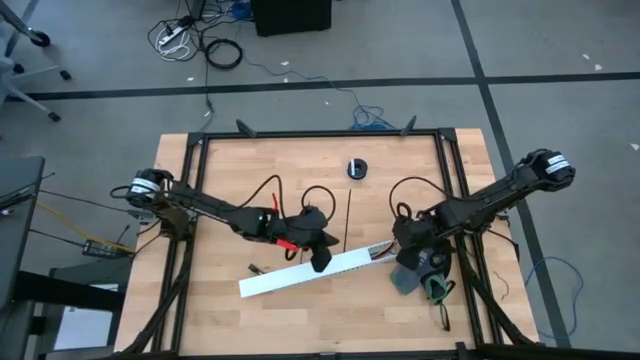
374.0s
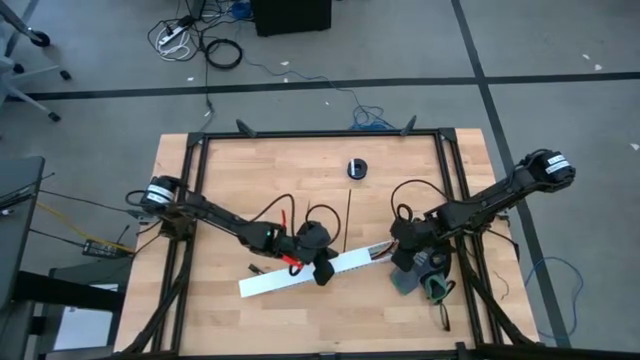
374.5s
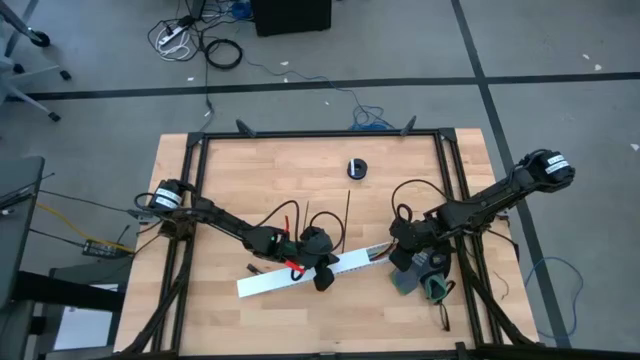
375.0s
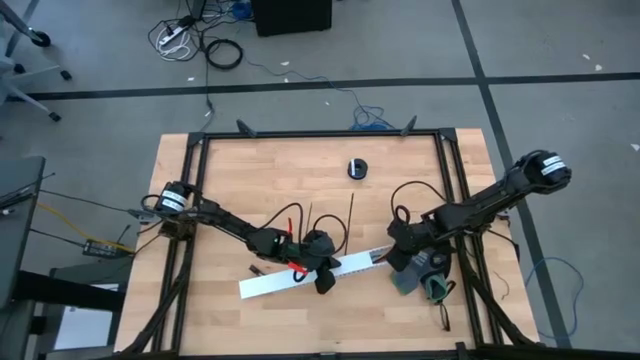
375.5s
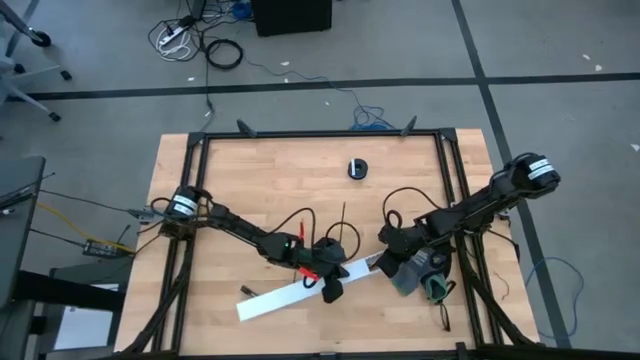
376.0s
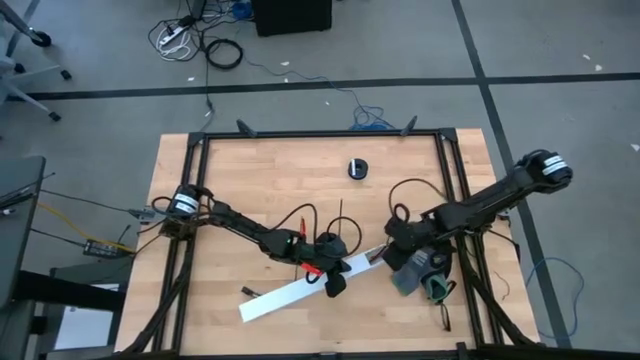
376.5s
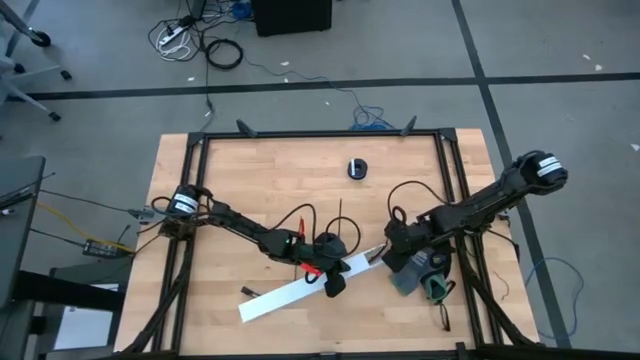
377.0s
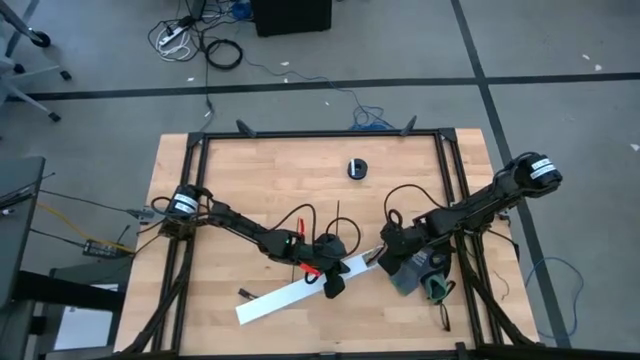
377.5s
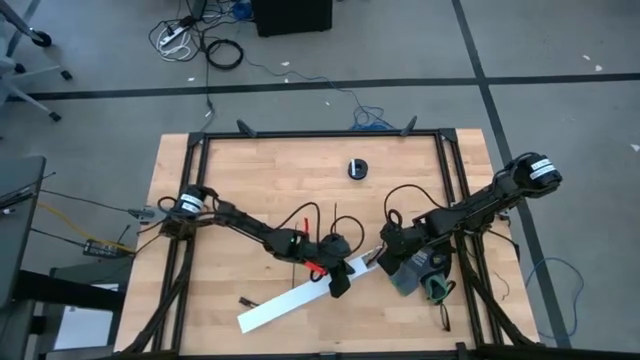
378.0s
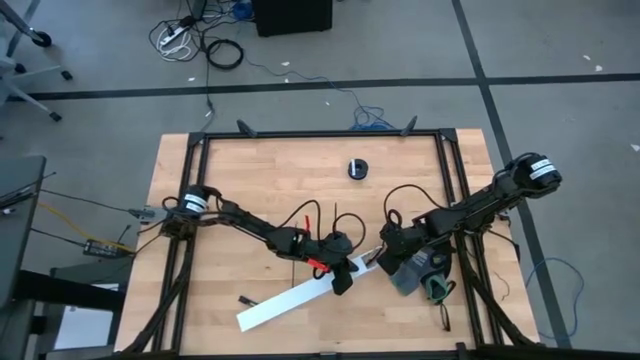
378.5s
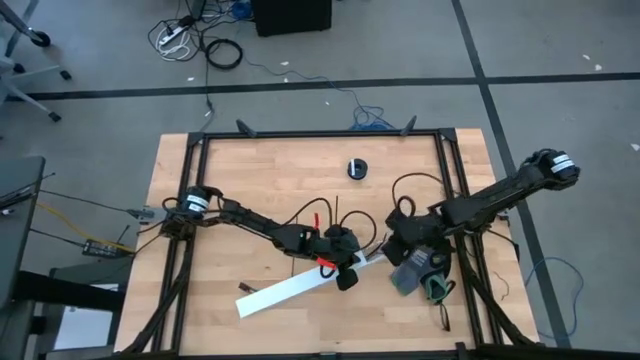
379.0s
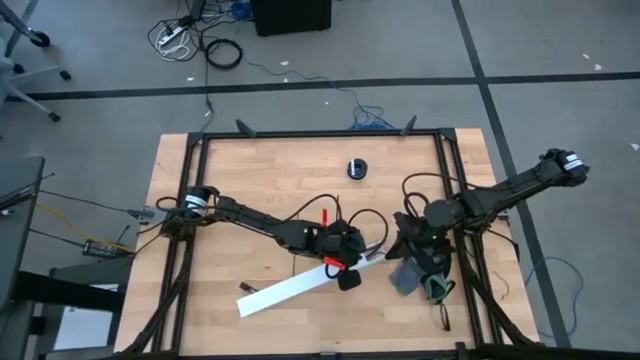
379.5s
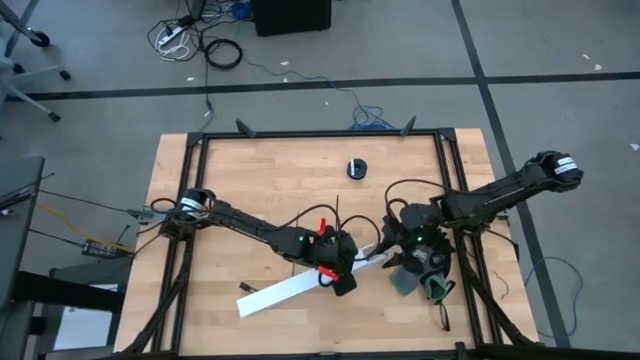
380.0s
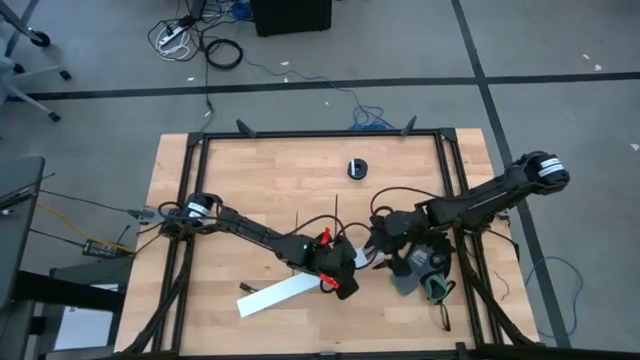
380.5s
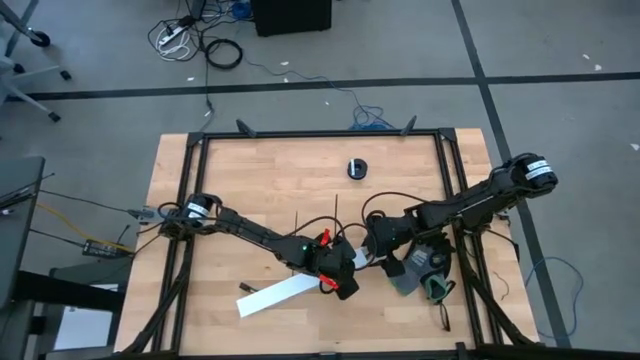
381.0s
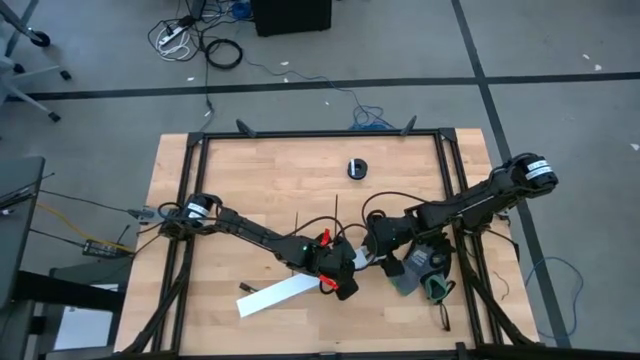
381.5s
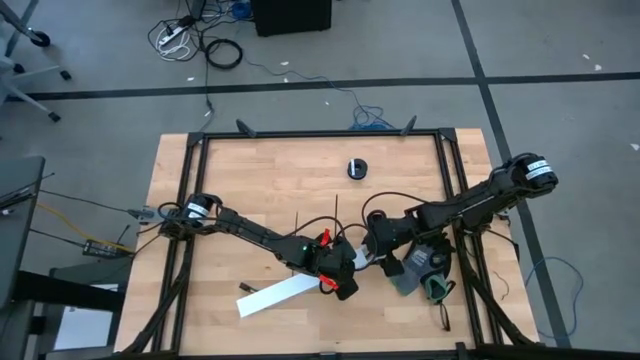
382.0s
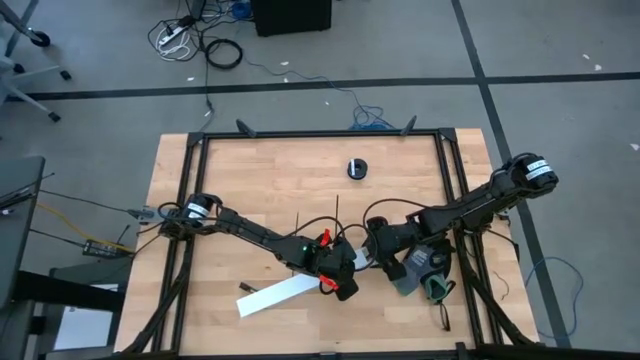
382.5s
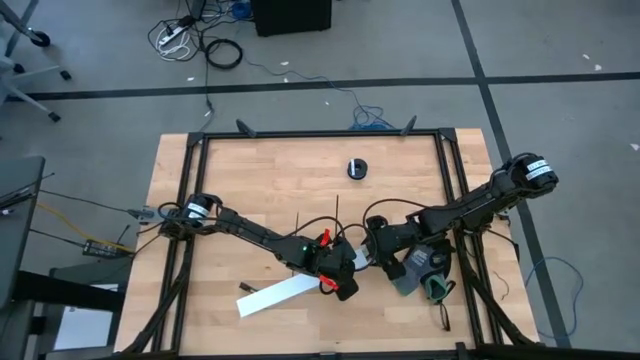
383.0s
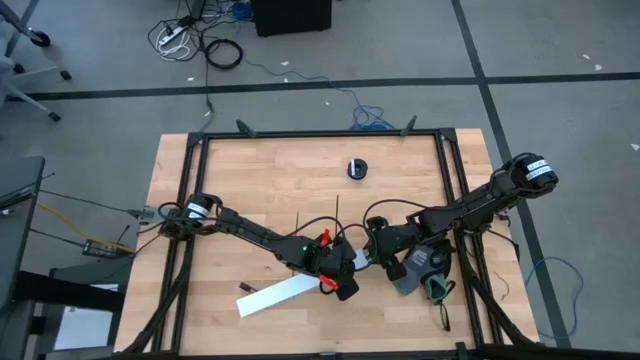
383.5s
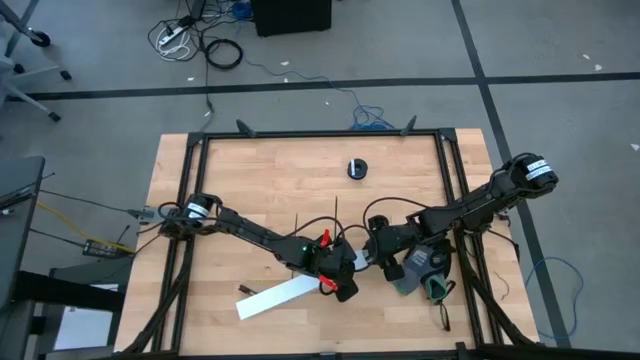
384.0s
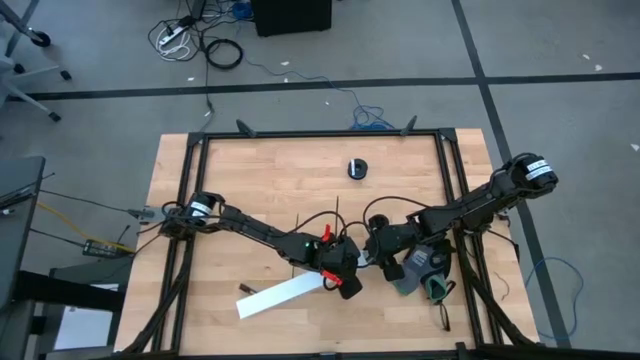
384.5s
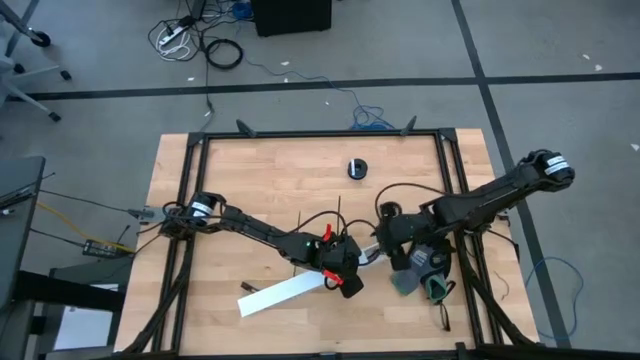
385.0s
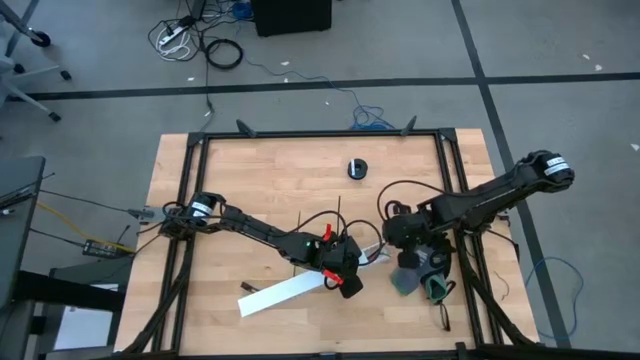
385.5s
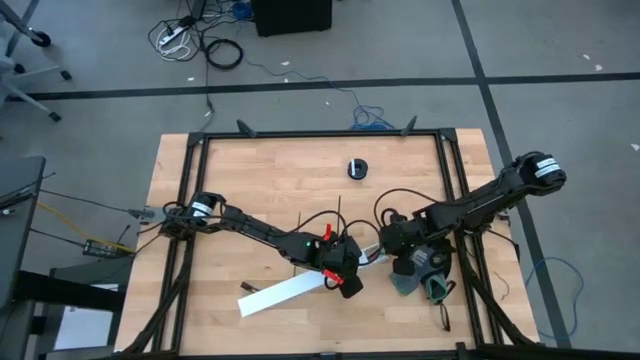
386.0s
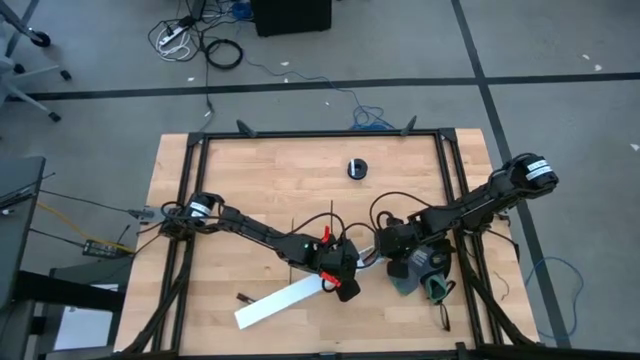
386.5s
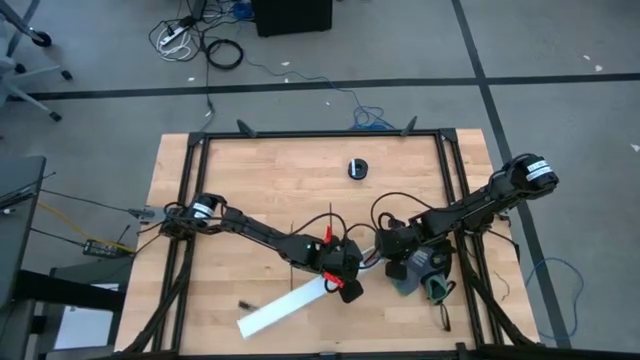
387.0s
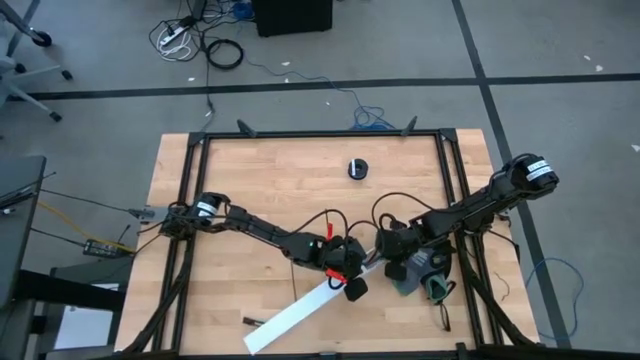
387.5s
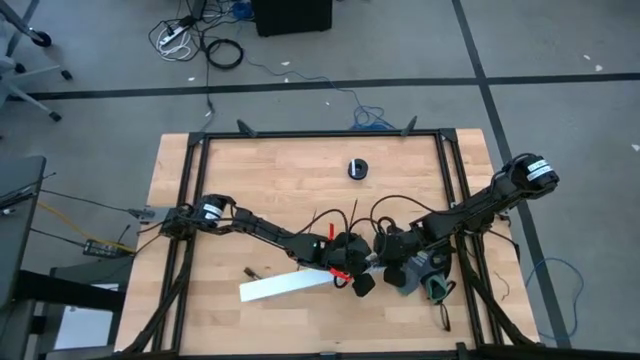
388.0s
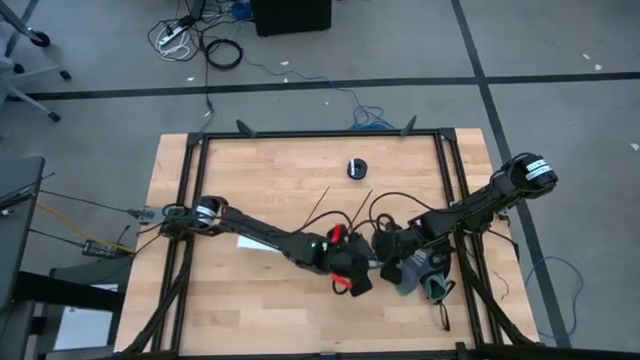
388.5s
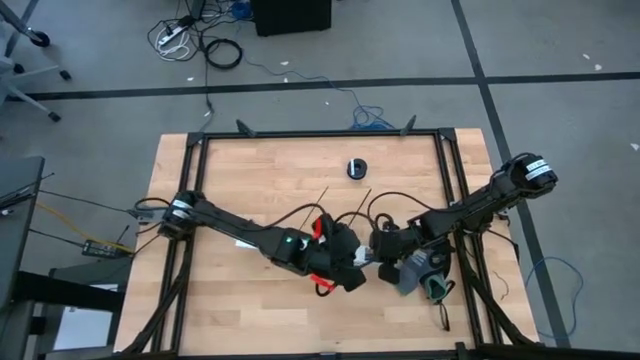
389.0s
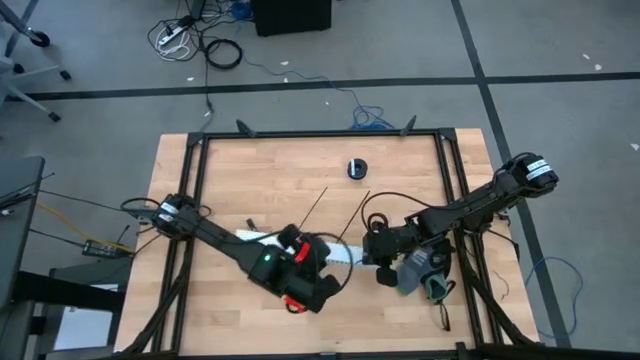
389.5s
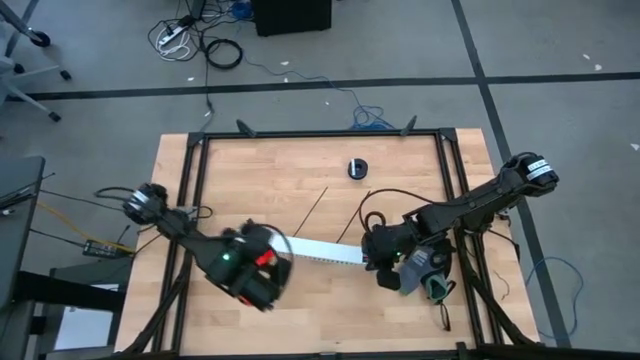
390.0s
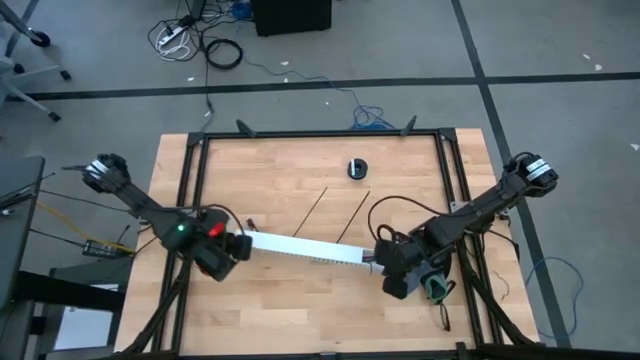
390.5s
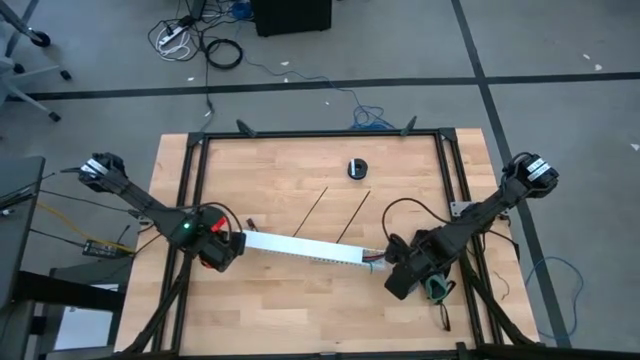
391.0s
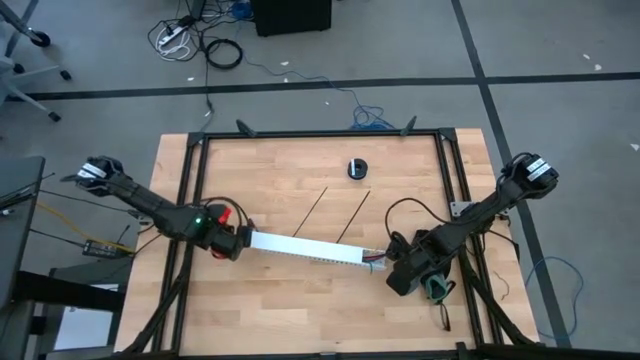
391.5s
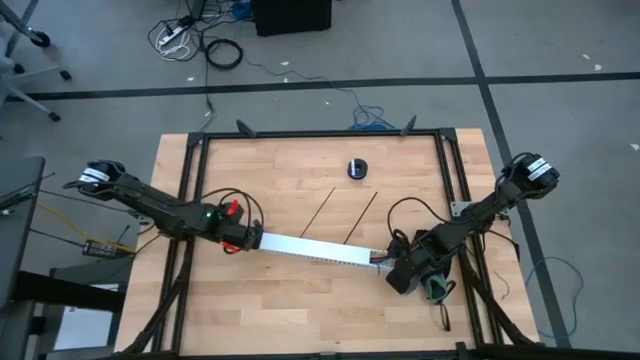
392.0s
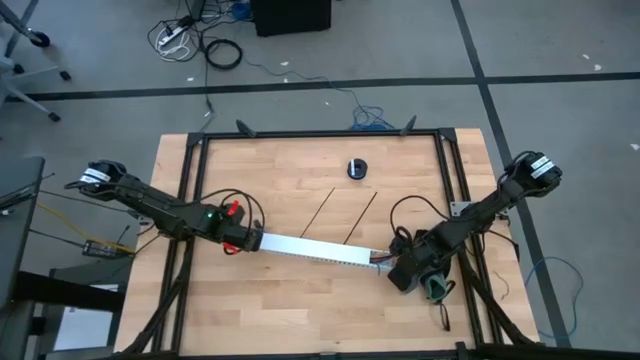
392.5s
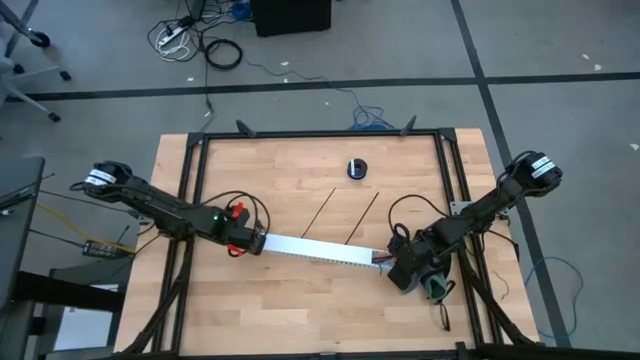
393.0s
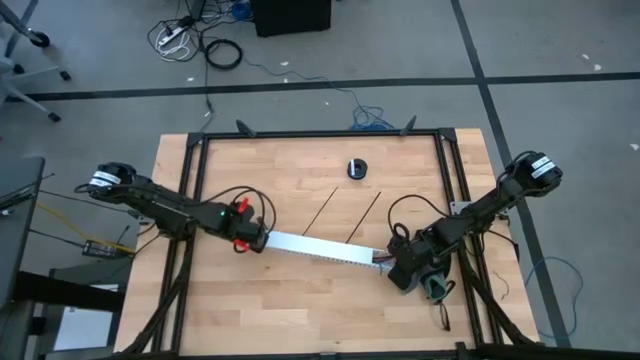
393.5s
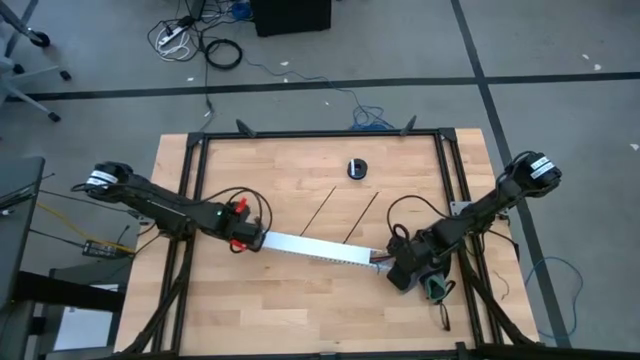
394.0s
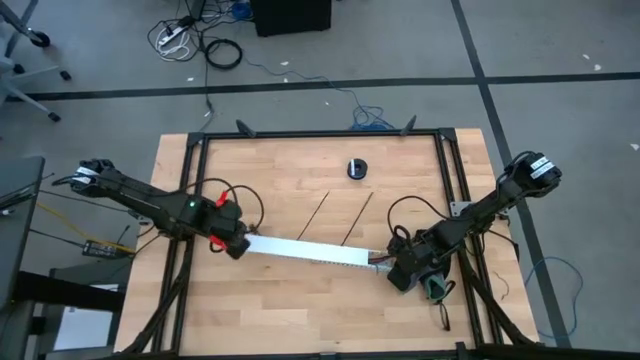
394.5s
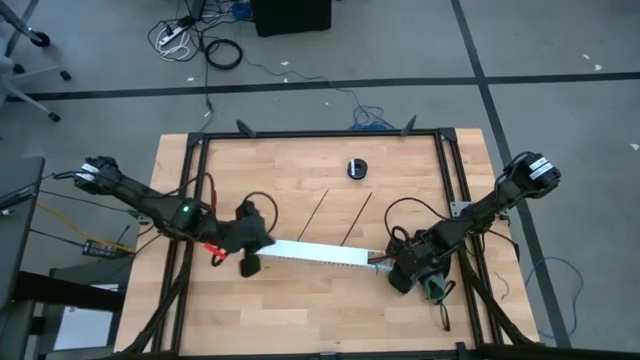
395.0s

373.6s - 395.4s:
Task: Ziptie cables
Close the white cable duct
